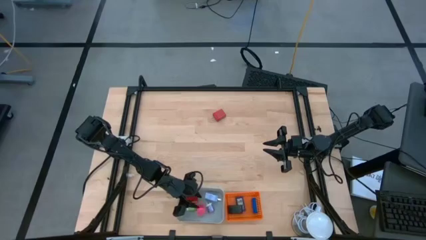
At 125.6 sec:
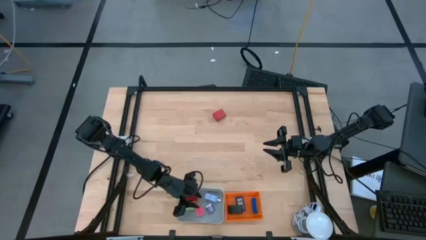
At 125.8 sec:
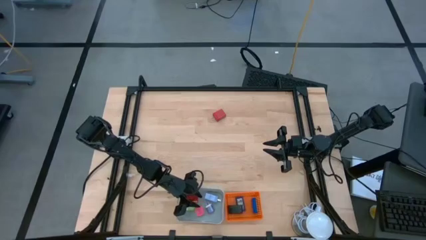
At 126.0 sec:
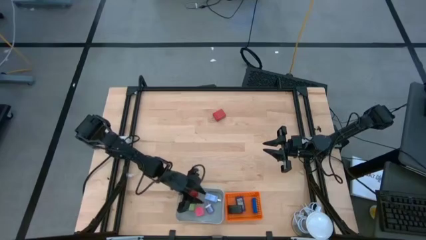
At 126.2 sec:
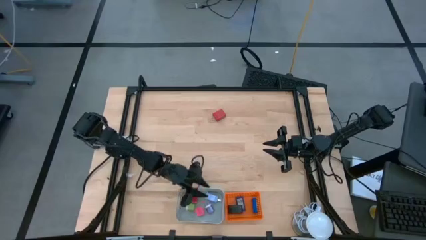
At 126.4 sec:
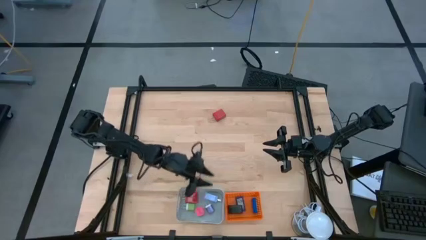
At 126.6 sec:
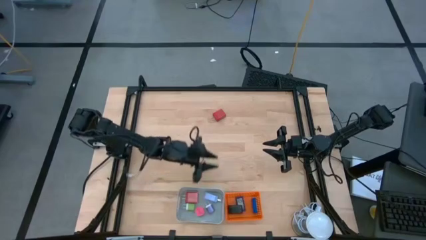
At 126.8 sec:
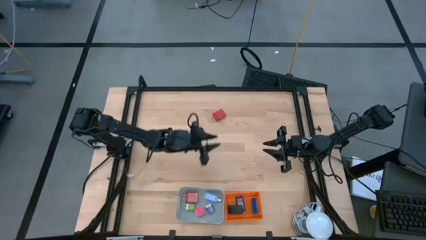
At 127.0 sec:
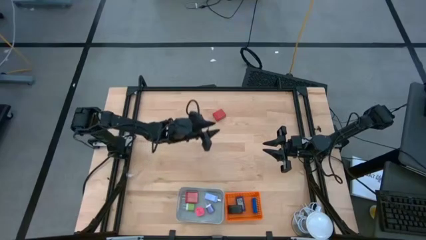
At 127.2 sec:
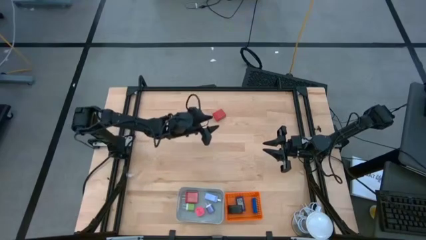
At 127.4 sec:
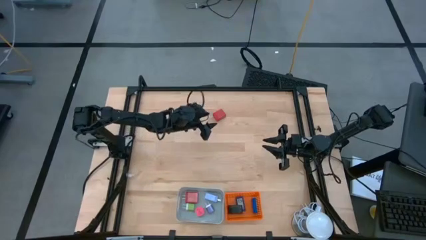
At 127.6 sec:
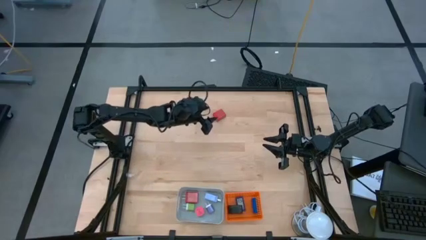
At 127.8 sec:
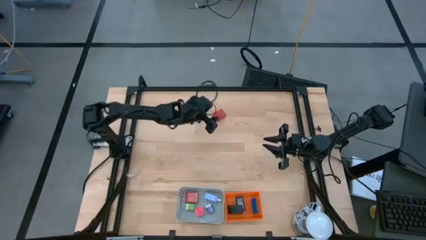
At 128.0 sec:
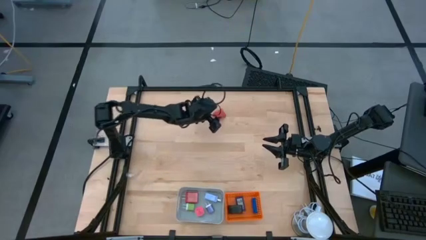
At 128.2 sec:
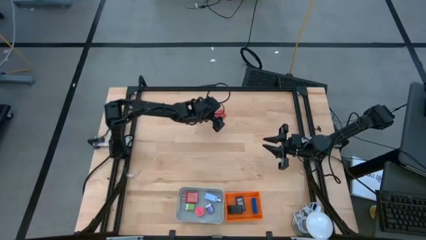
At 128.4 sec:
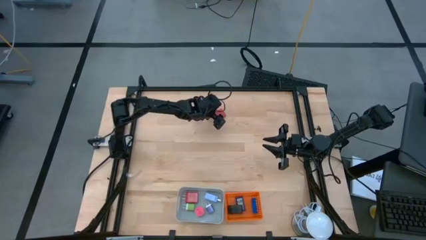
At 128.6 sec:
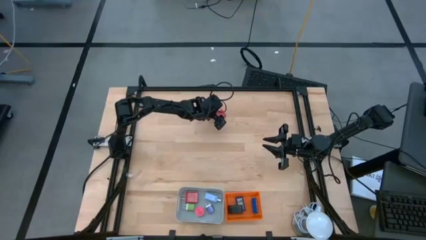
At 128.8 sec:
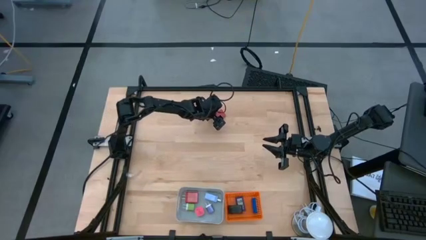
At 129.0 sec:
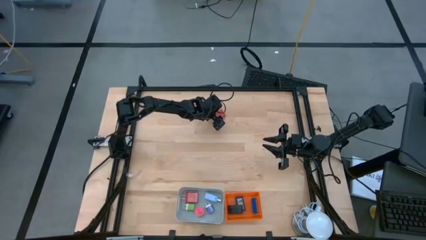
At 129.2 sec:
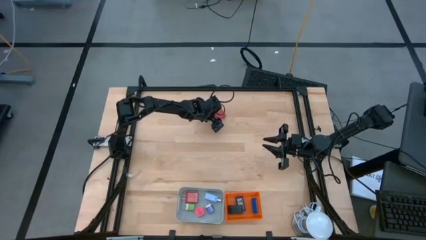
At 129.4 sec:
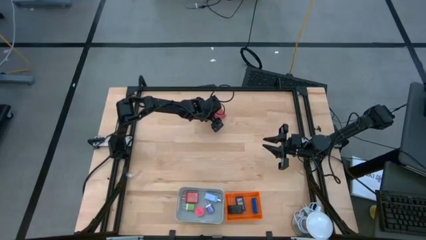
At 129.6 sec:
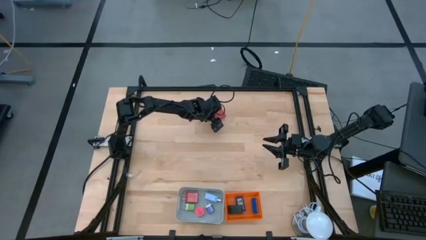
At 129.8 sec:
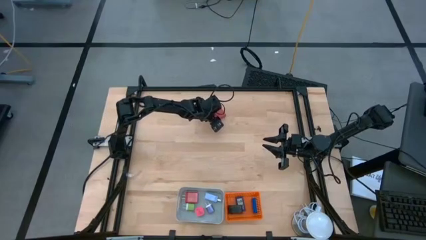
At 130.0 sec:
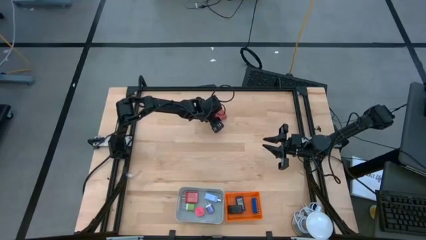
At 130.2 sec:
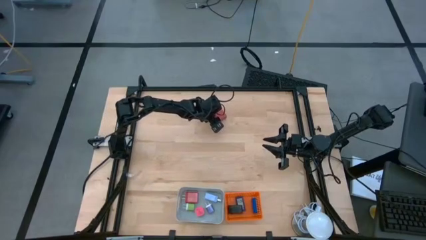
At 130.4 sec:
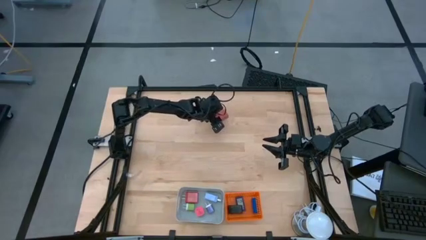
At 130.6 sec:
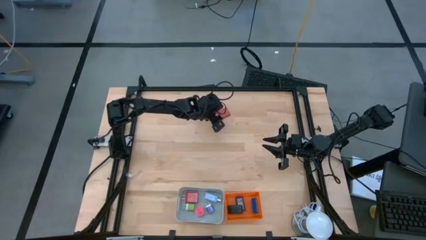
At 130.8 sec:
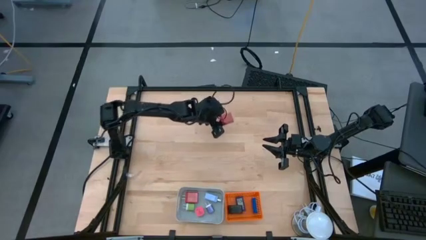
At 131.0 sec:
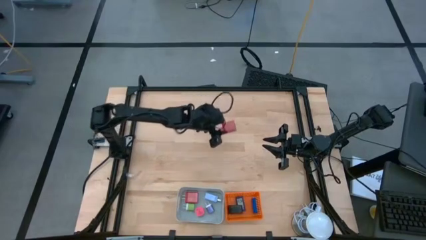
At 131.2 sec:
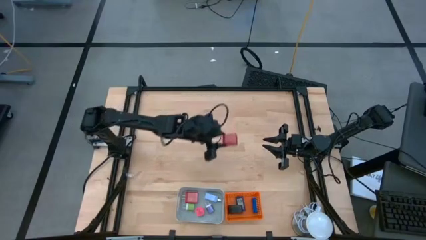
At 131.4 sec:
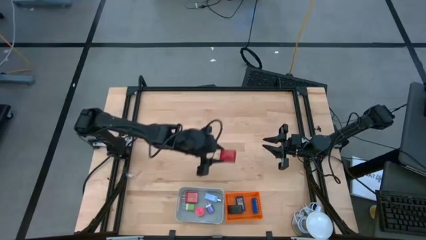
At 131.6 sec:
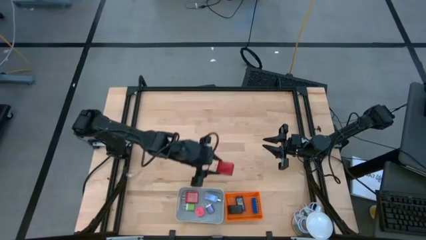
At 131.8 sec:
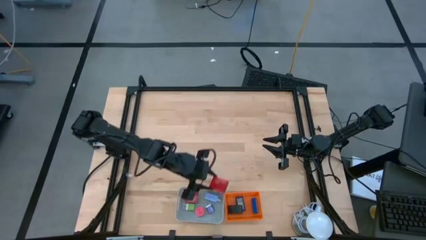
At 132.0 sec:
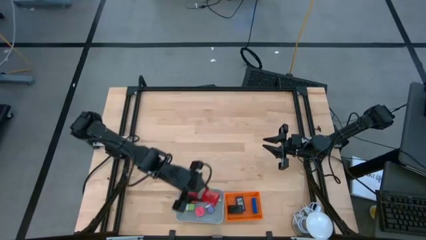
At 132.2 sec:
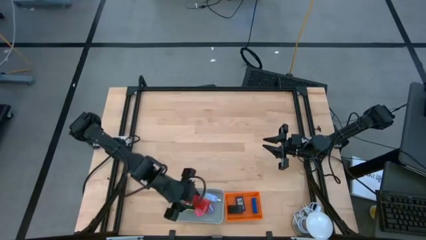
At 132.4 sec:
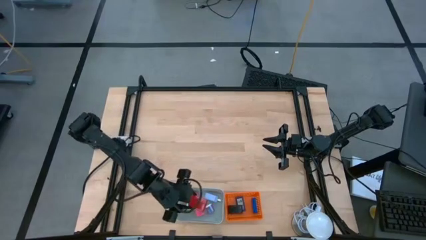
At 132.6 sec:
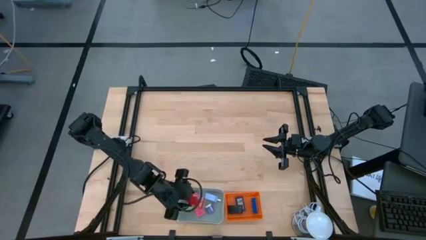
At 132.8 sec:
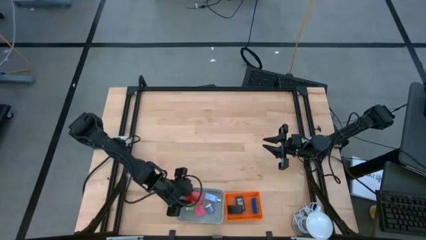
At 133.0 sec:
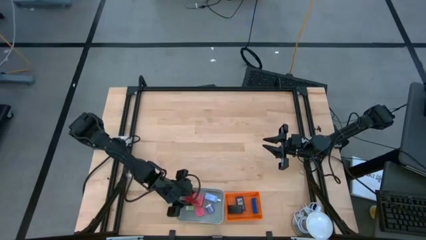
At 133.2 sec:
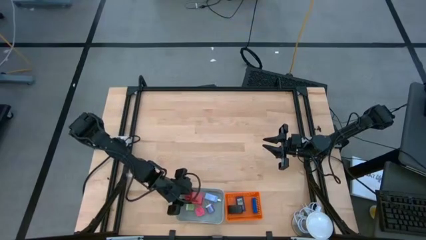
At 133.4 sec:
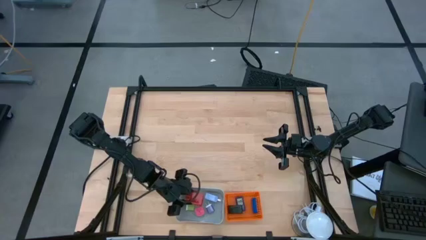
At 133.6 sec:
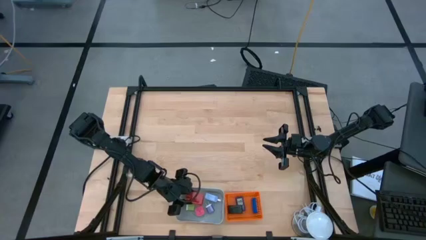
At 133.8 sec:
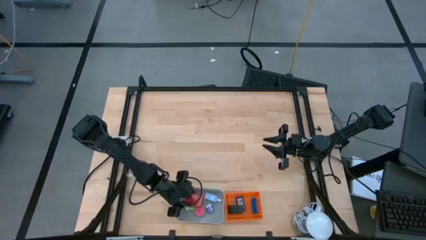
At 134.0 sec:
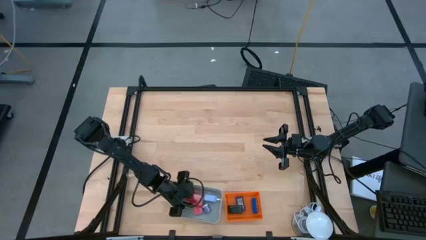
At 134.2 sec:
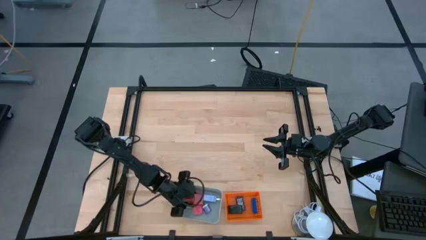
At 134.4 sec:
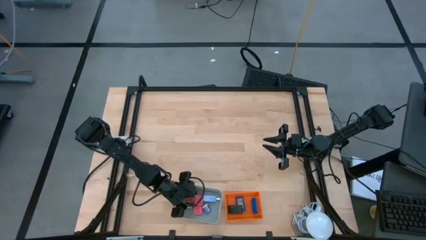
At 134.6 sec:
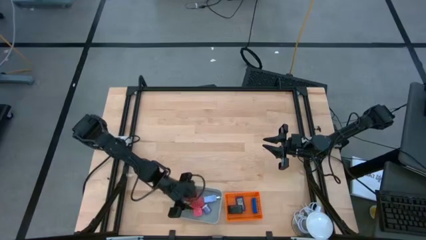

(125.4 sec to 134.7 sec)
Task: Pick & Place Office items
Put the red charger adapter into the gray bin

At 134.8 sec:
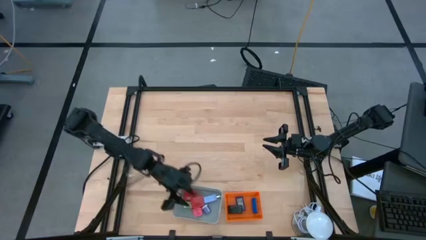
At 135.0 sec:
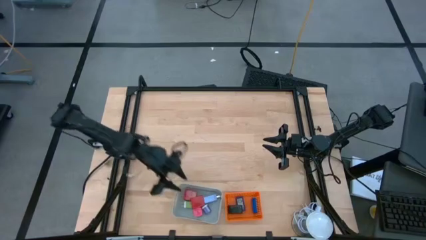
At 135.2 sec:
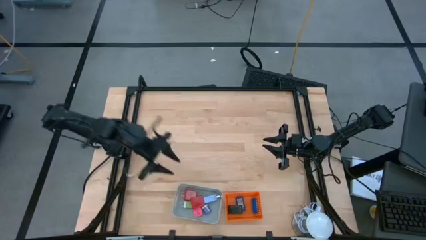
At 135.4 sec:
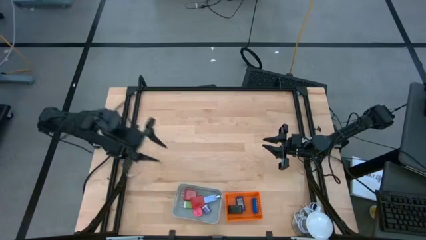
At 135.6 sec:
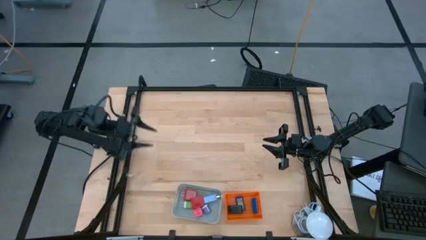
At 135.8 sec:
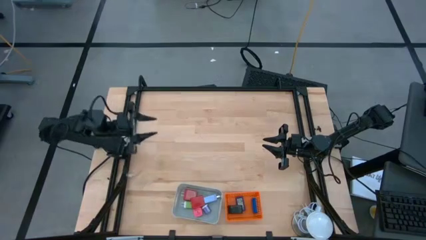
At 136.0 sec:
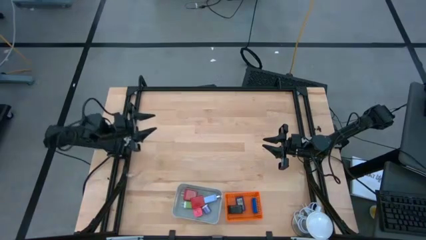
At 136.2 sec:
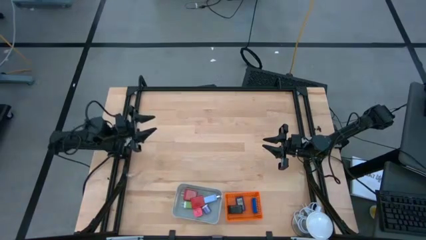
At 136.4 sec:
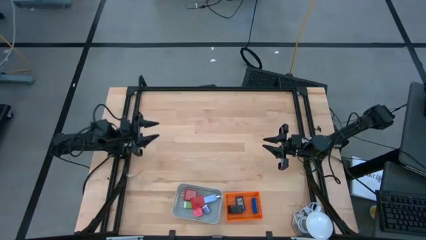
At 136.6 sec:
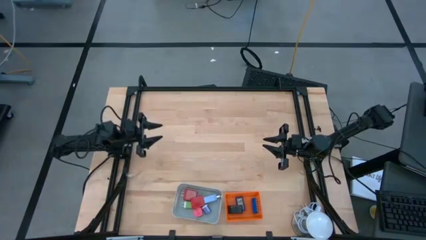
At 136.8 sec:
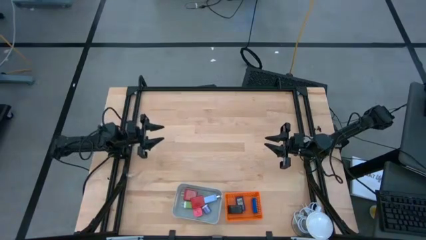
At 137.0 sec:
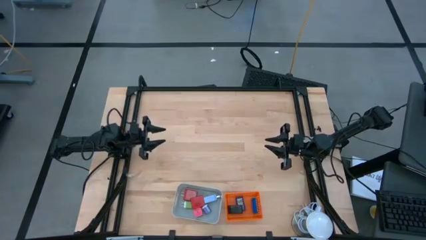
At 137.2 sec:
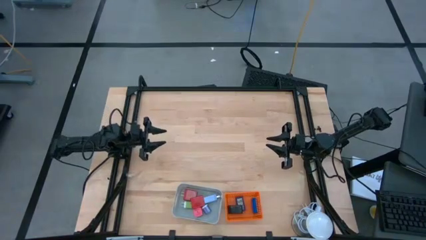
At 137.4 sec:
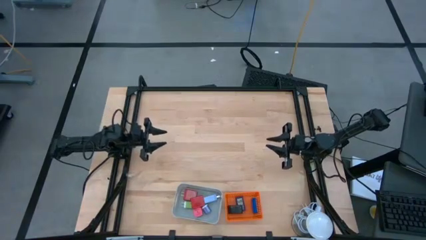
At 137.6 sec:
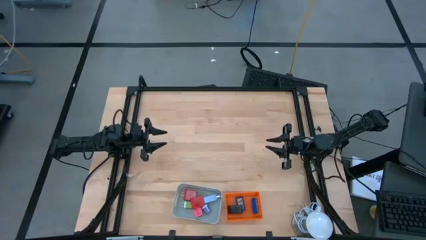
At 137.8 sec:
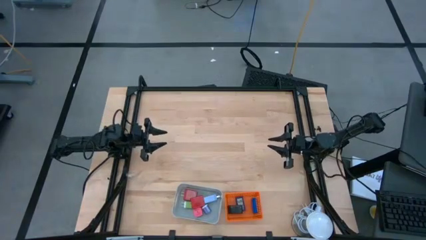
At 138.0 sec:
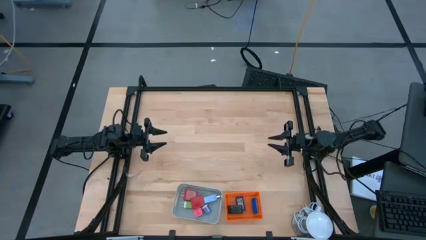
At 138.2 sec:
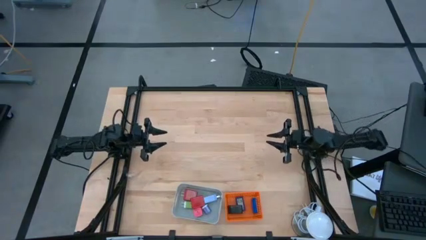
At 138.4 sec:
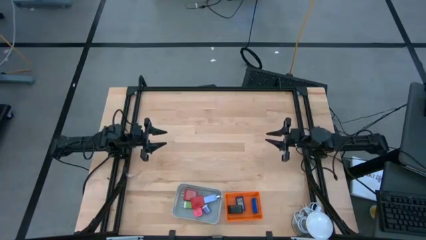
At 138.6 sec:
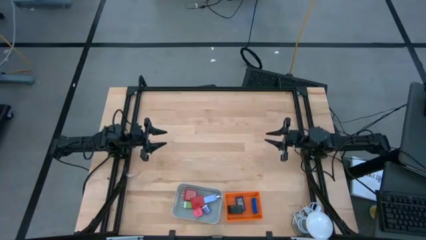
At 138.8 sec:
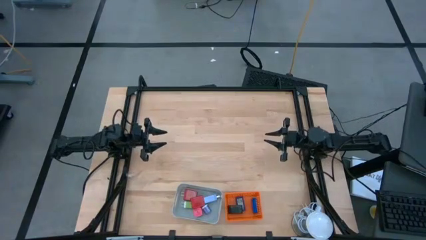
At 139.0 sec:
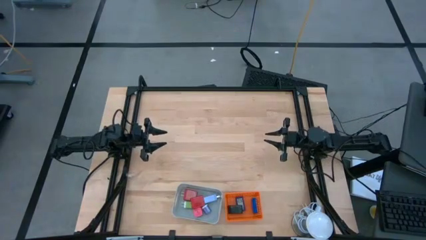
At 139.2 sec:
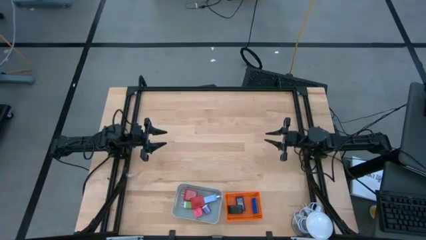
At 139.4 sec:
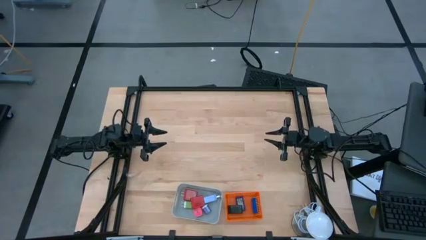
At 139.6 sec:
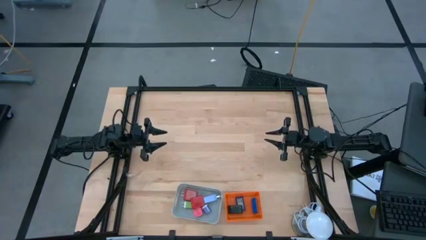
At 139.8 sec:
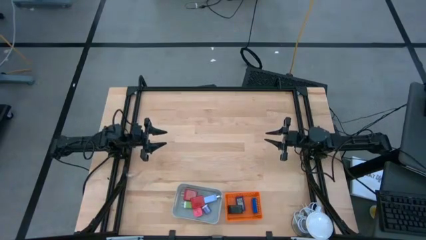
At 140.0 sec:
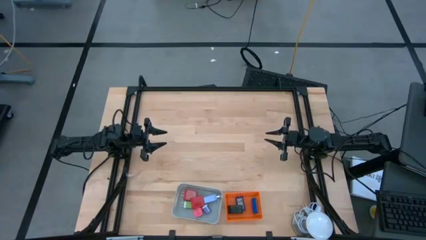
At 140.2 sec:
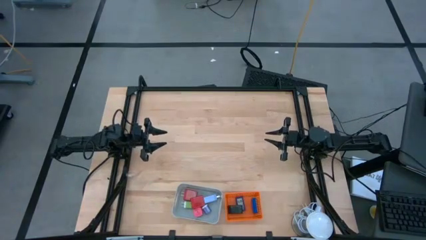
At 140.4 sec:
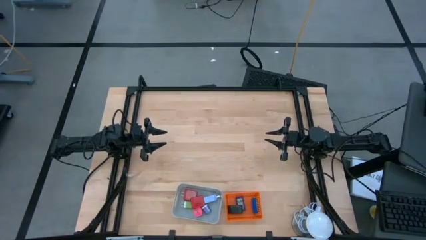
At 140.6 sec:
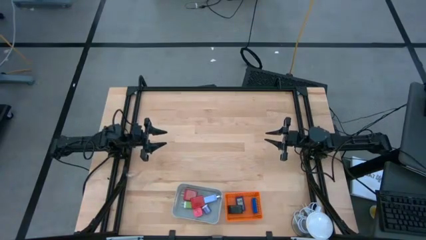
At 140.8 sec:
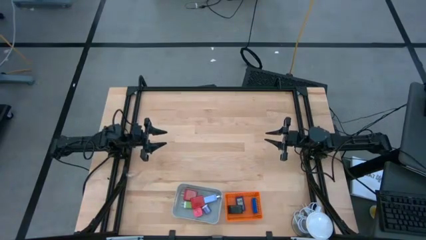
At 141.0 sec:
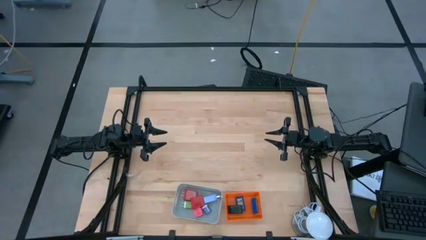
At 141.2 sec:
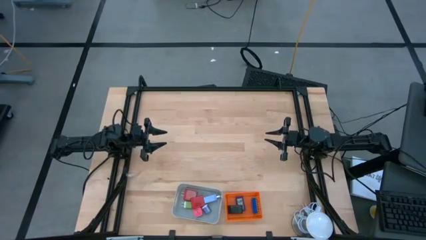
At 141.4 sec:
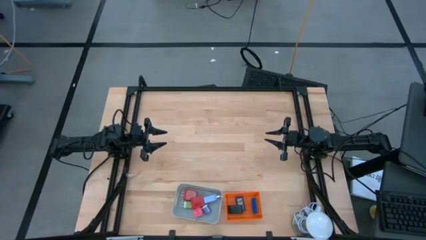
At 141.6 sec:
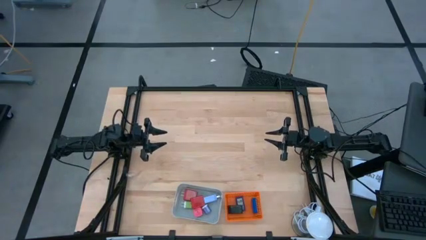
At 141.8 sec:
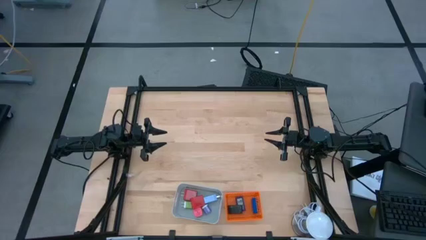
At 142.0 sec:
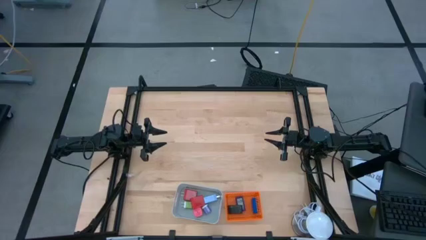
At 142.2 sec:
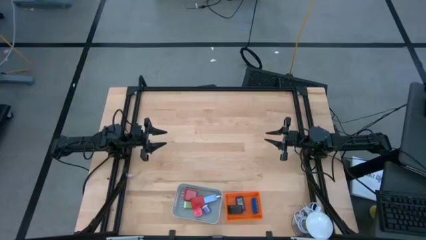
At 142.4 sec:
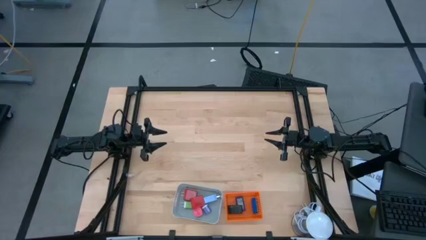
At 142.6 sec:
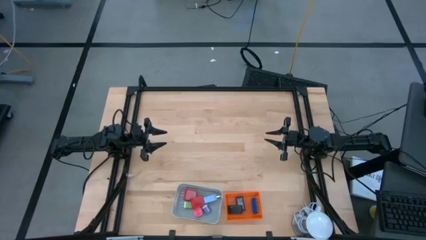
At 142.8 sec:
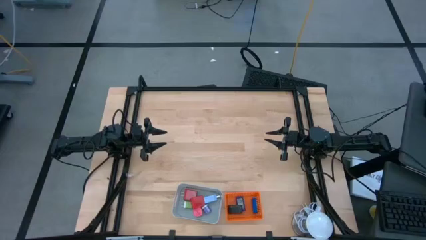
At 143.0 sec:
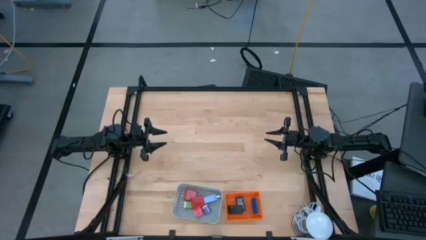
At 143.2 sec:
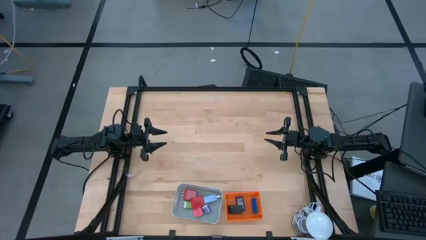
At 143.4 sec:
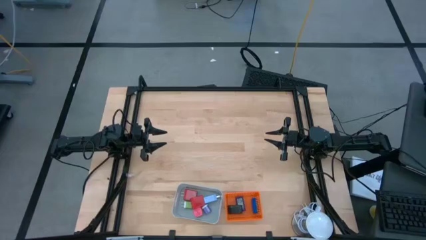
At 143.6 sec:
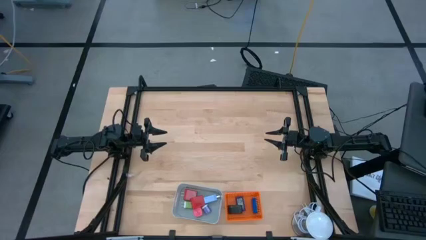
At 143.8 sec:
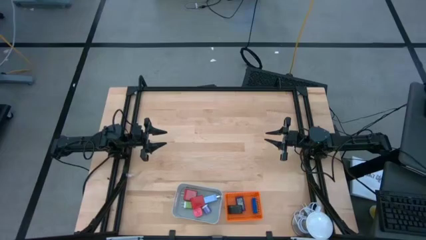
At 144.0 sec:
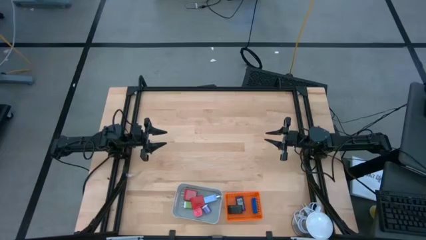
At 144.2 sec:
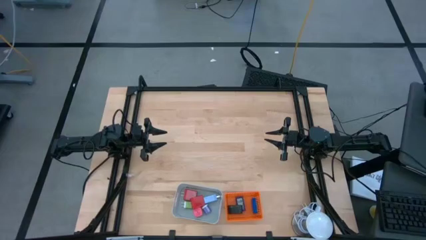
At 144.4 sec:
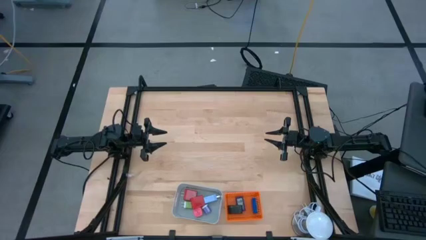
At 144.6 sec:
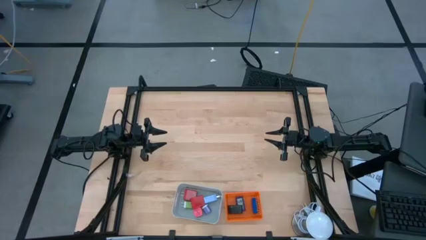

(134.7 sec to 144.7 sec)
Return to Home Position
